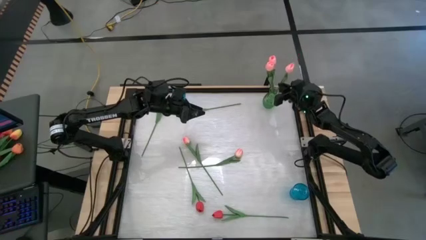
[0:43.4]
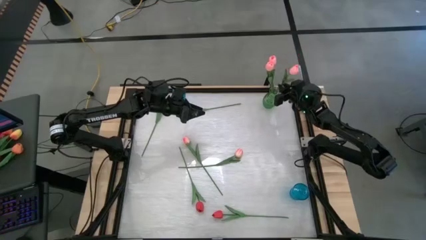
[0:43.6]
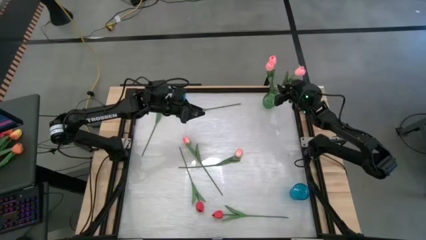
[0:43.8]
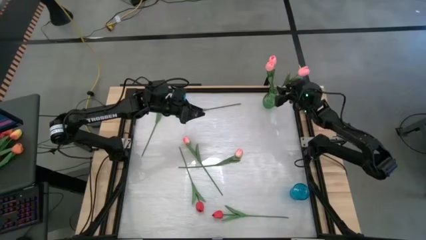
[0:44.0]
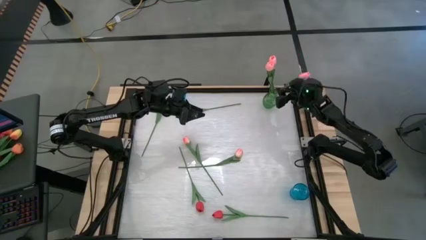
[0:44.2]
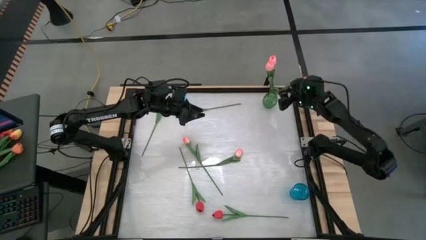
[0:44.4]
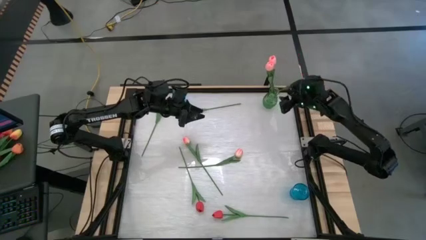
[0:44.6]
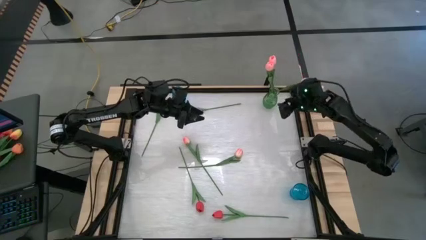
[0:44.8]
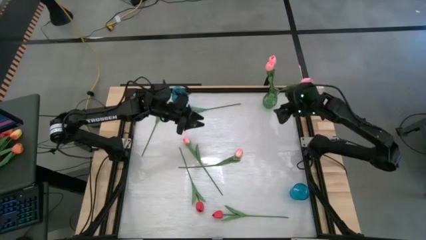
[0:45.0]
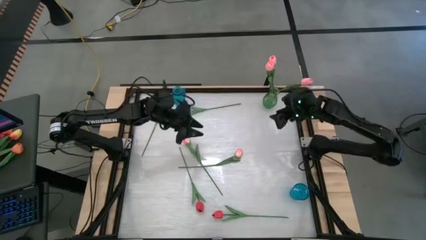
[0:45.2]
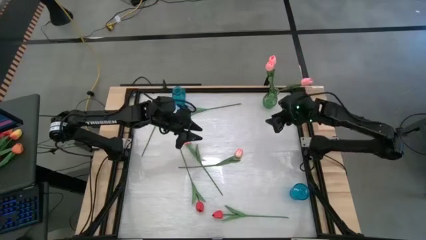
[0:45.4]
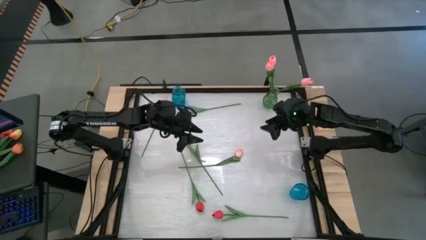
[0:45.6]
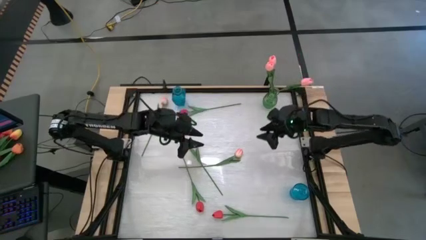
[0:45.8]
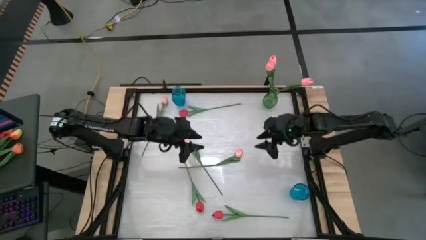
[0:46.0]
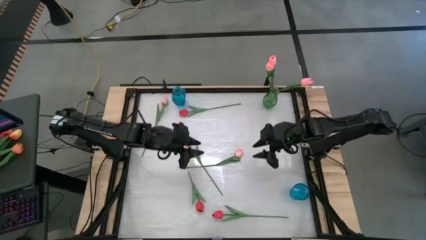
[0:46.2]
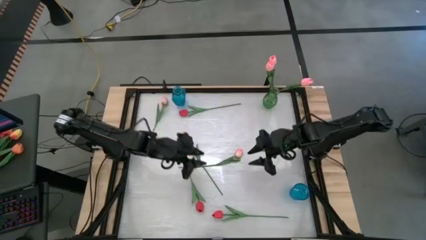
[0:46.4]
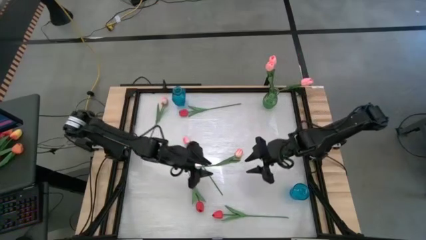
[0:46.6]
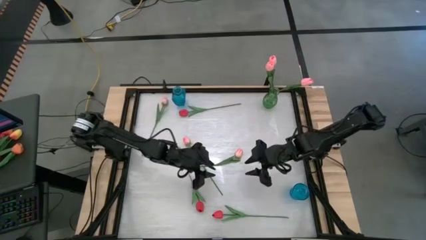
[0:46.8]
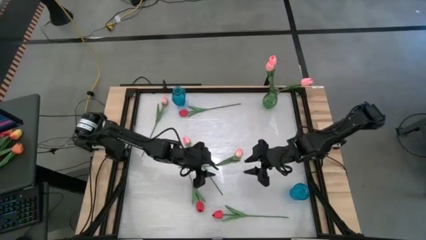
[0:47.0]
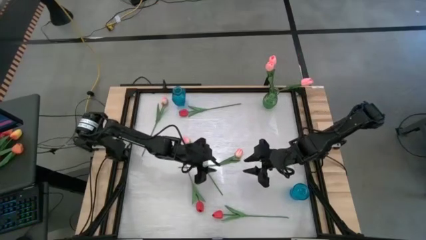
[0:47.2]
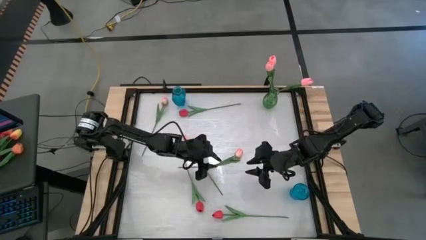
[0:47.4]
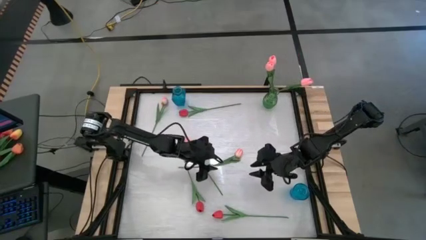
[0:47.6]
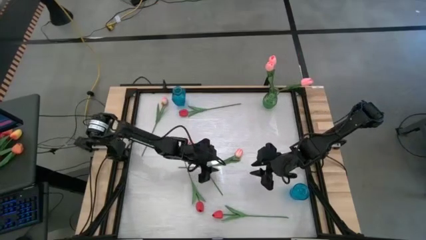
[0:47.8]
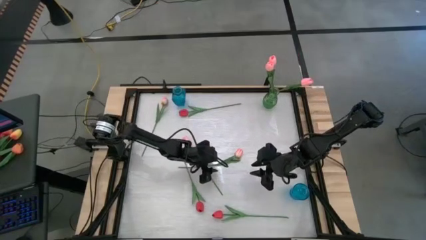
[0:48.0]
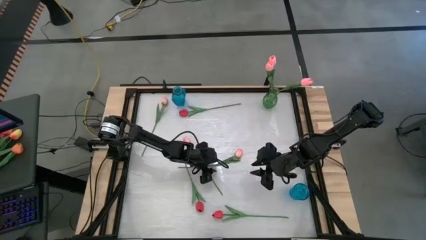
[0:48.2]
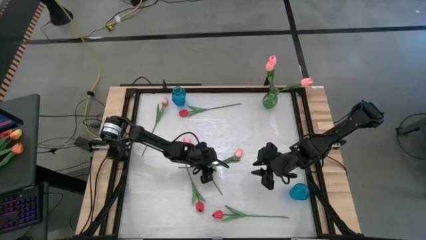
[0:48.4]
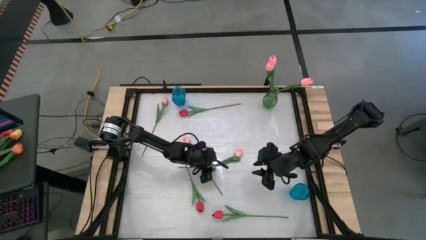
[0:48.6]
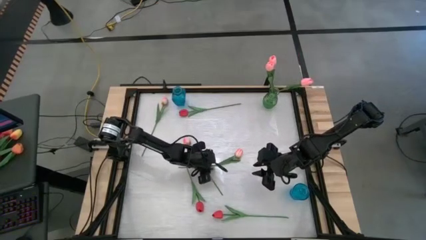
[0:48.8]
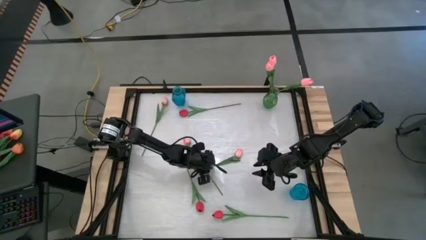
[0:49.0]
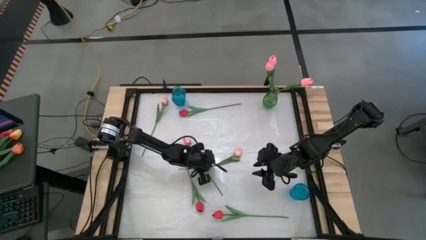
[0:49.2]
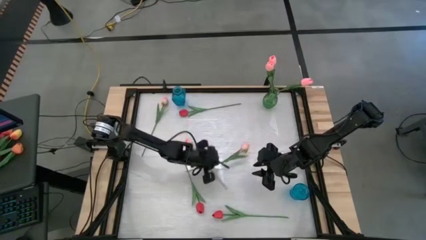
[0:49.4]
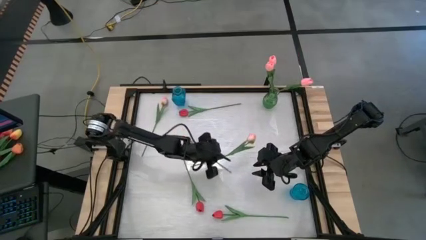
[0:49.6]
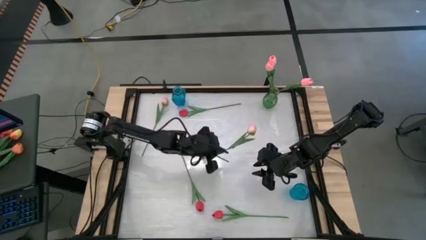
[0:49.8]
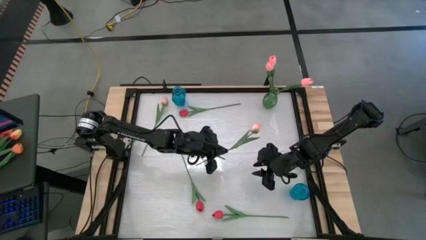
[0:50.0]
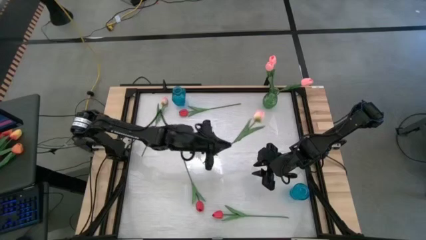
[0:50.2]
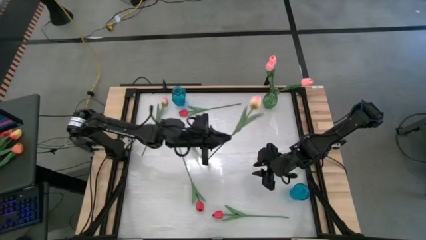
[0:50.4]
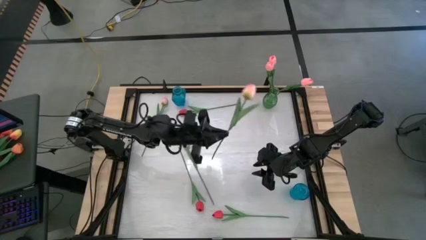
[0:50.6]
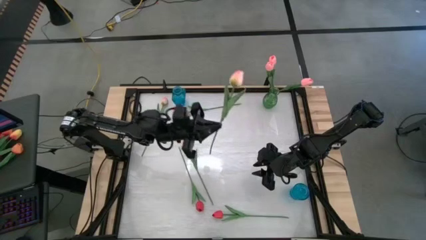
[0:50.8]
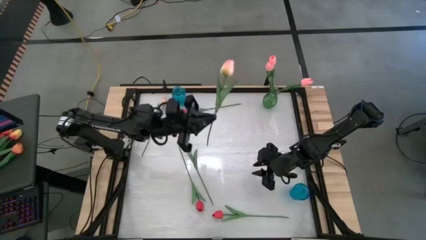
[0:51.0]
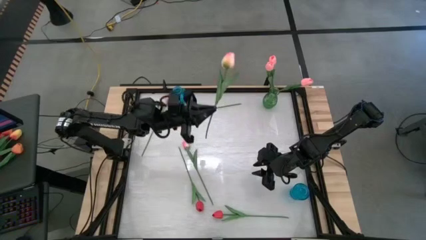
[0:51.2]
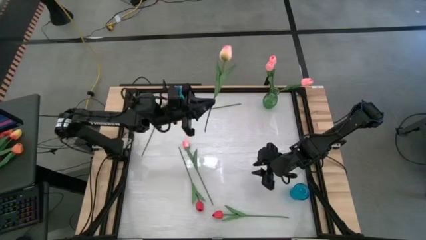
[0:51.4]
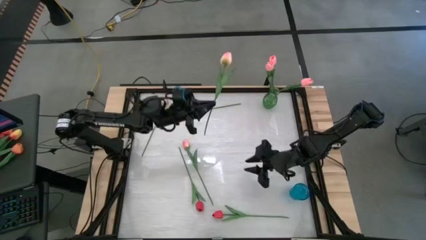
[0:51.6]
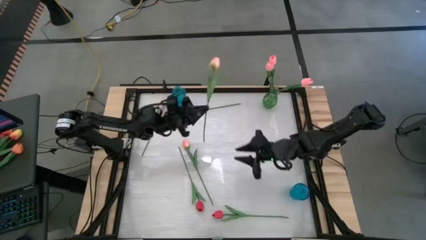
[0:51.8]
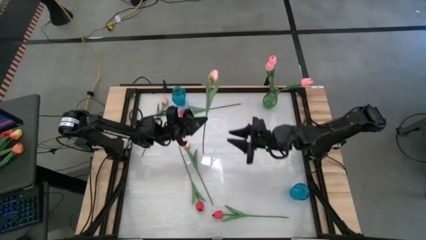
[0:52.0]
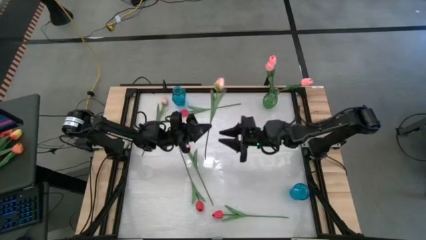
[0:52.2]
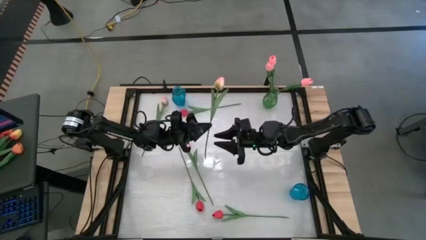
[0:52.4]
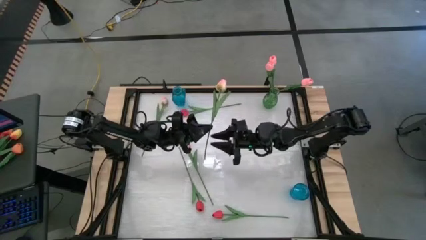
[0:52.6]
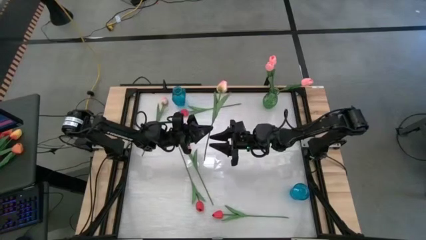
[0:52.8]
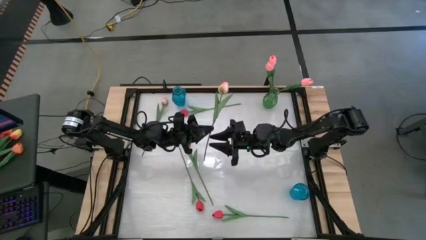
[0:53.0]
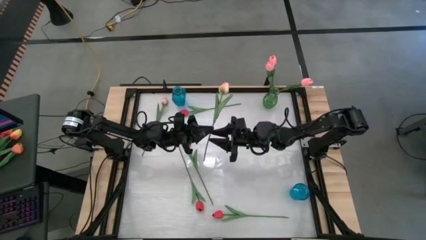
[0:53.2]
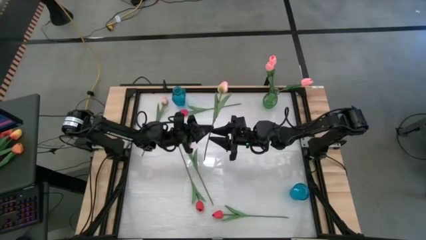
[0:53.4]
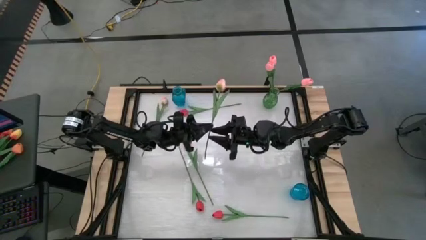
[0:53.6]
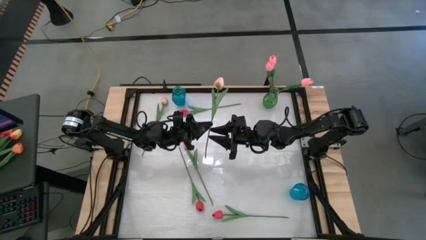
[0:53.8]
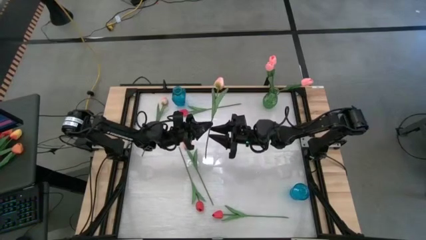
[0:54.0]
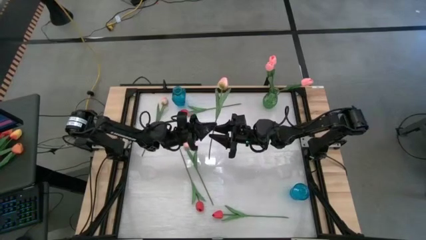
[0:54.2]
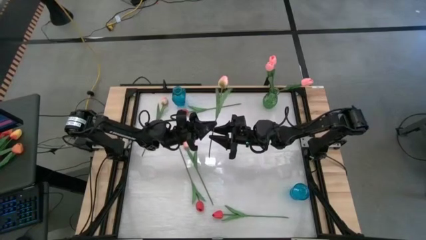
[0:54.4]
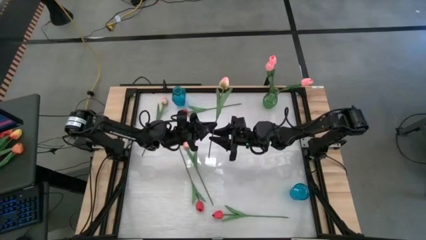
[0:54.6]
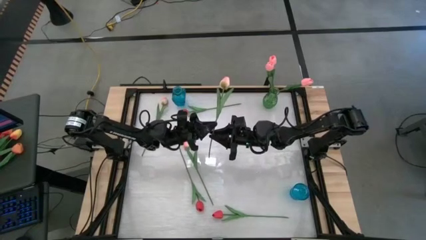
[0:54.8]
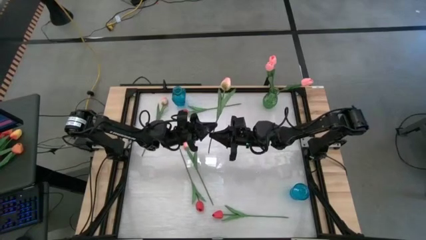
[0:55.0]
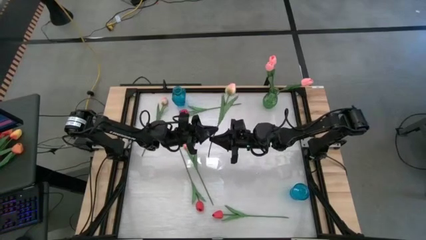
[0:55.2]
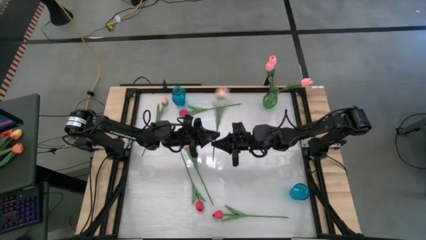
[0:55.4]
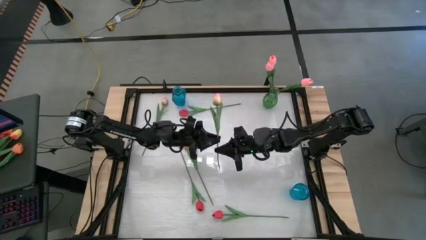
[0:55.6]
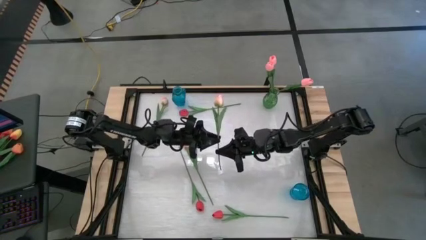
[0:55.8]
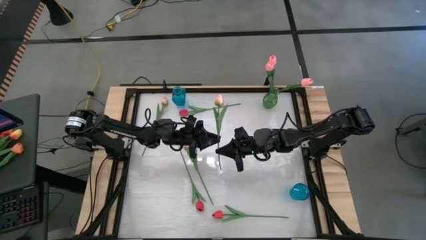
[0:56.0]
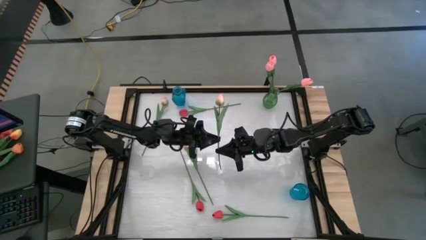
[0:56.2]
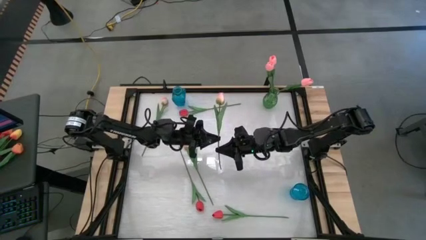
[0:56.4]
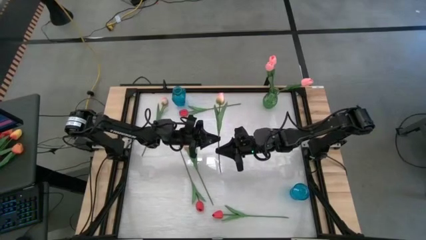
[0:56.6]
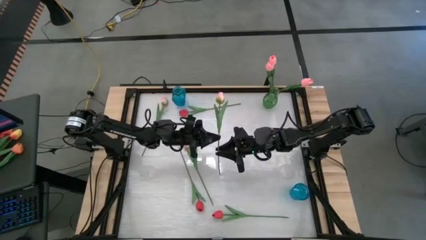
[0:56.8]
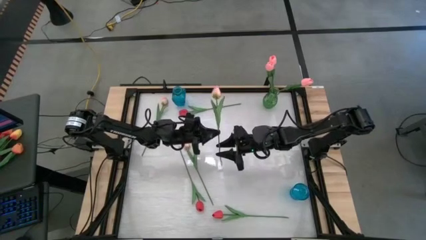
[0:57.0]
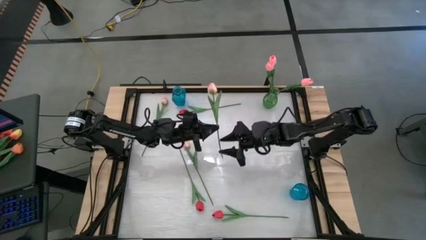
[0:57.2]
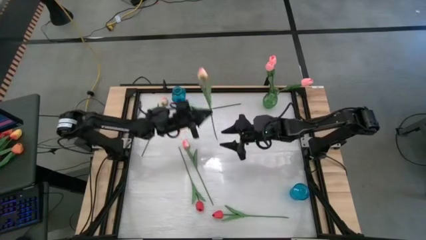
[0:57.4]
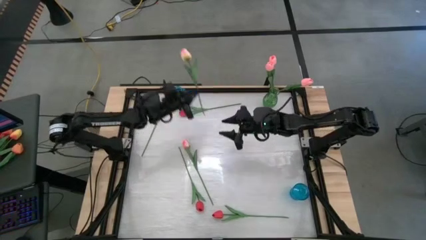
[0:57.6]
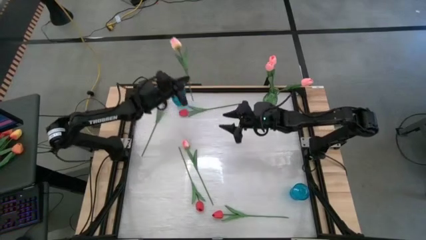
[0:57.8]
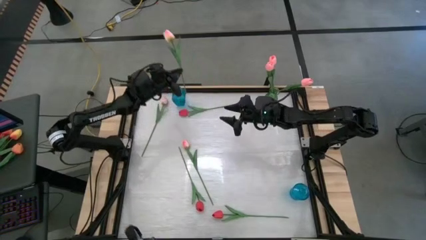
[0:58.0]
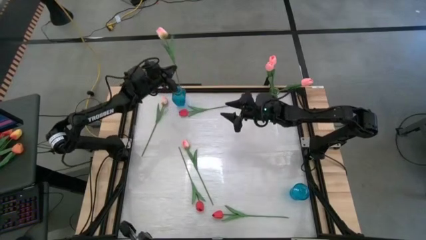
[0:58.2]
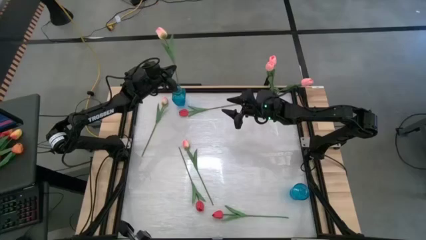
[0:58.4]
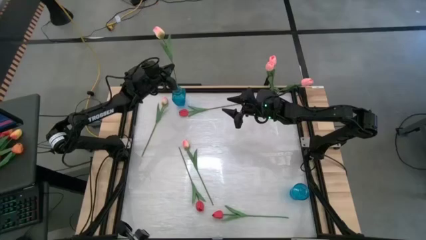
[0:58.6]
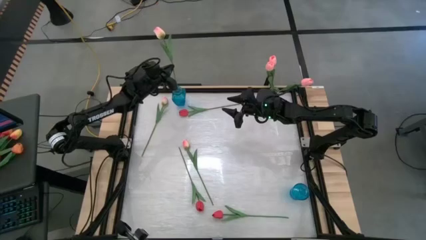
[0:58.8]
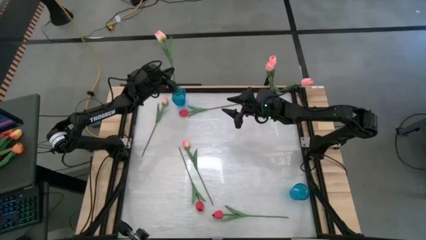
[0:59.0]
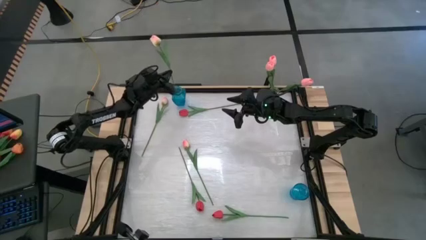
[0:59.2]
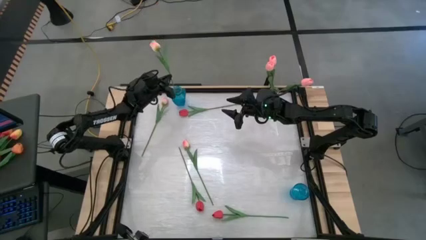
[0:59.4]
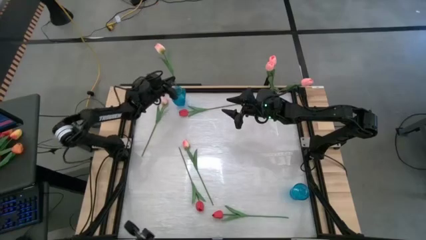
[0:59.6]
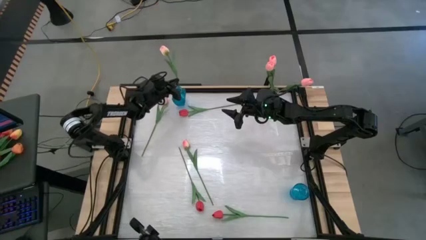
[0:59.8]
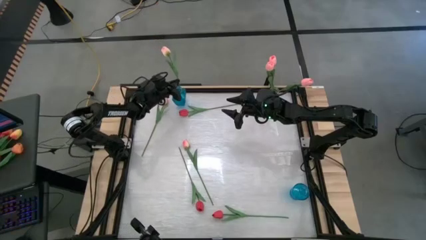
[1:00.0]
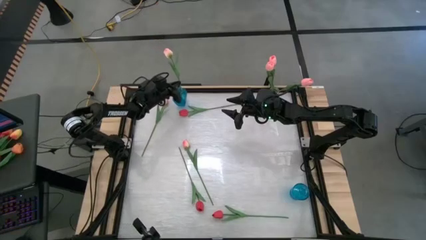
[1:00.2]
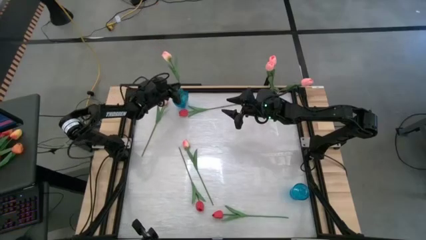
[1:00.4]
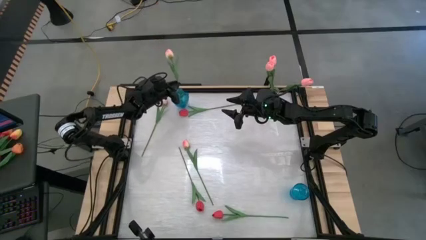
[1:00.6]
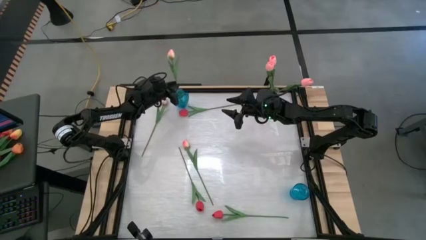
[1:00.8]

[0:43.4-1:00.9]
Task: Sort flowers into vase by color
Put the bottom right light pink flower into the top blue vase
